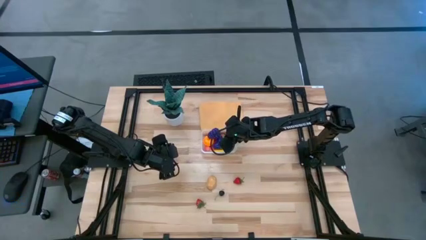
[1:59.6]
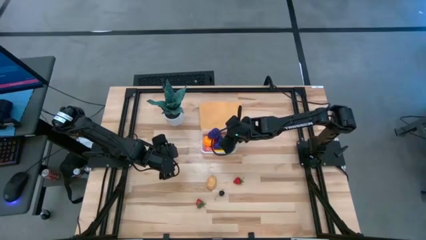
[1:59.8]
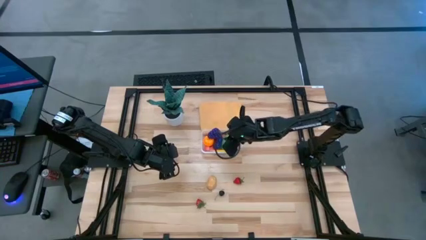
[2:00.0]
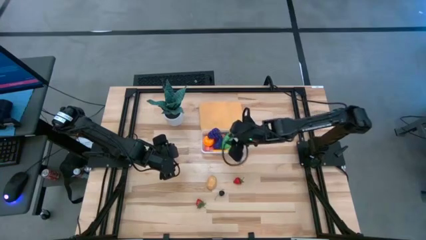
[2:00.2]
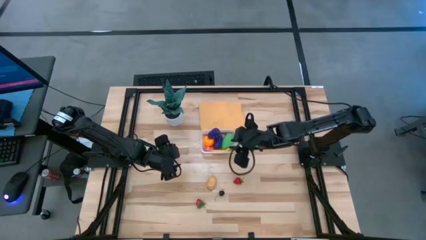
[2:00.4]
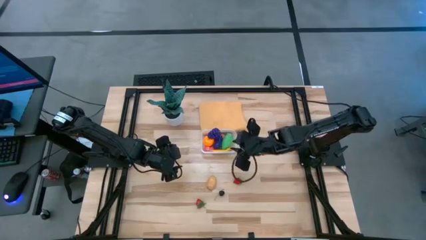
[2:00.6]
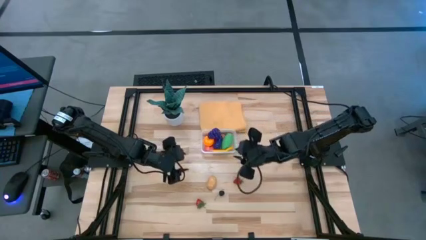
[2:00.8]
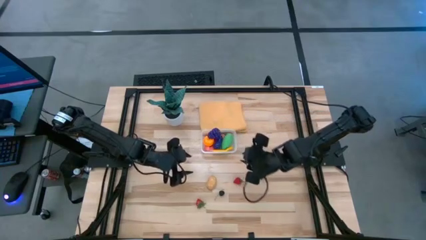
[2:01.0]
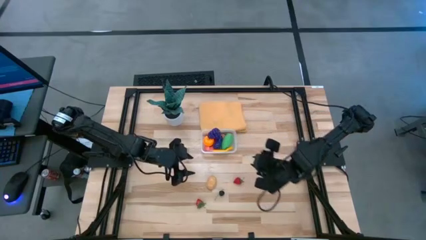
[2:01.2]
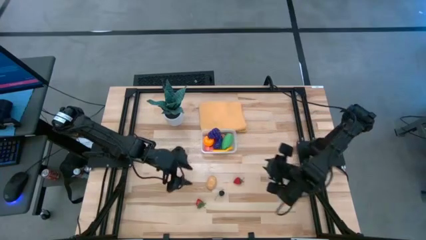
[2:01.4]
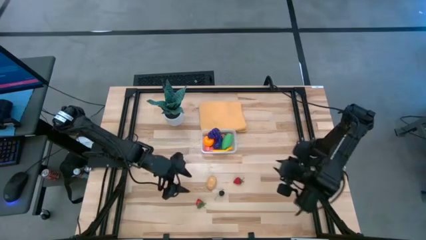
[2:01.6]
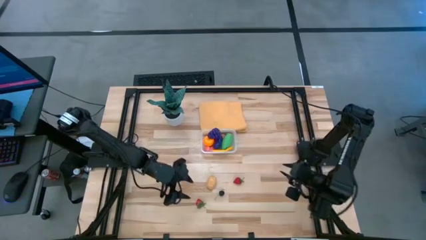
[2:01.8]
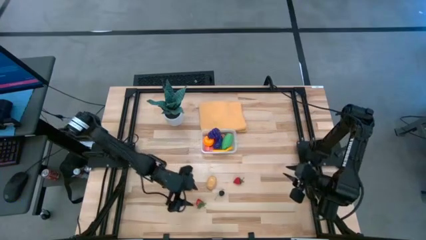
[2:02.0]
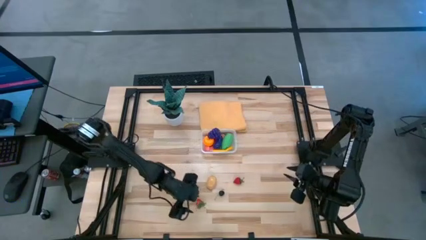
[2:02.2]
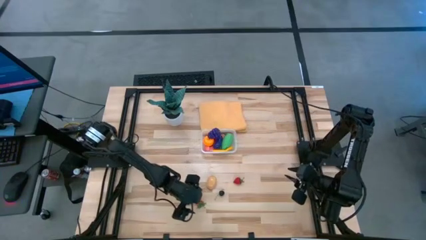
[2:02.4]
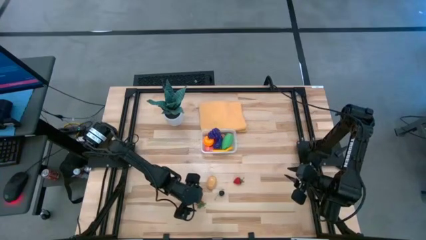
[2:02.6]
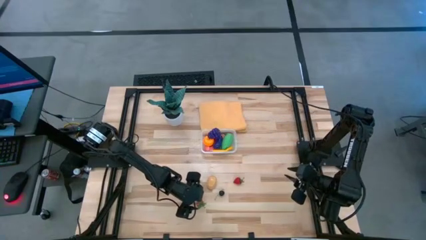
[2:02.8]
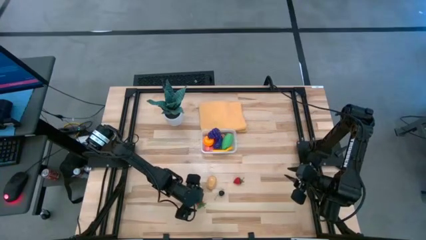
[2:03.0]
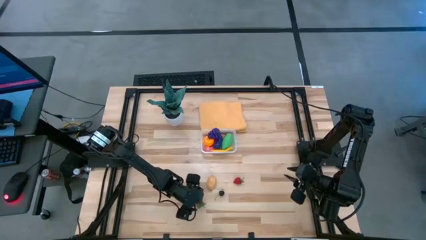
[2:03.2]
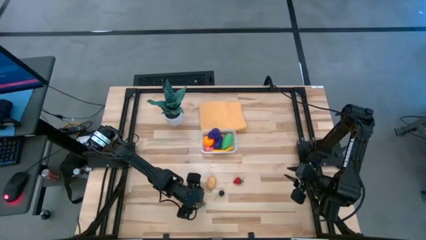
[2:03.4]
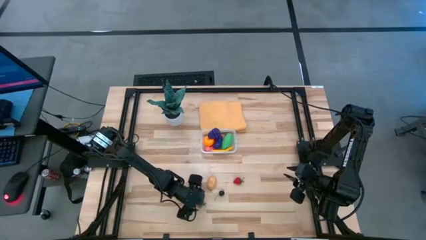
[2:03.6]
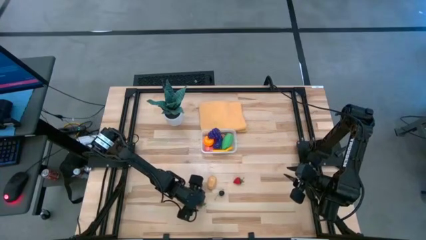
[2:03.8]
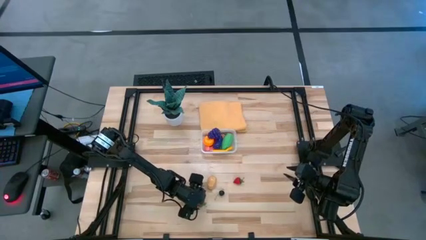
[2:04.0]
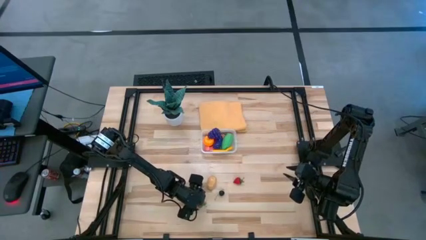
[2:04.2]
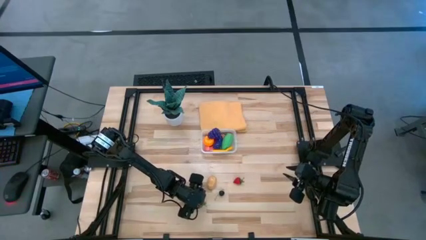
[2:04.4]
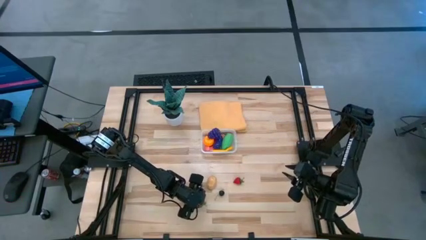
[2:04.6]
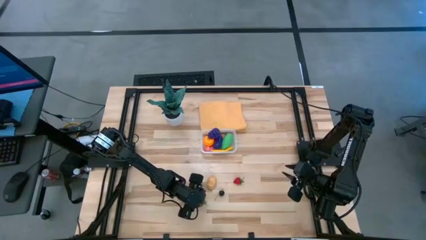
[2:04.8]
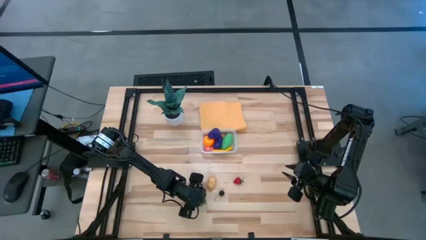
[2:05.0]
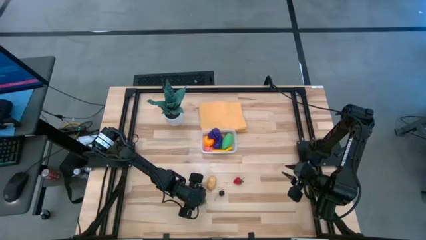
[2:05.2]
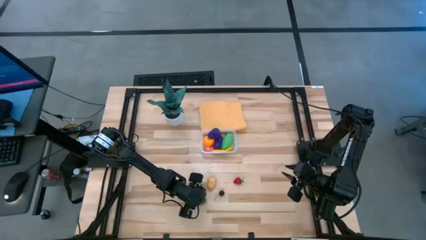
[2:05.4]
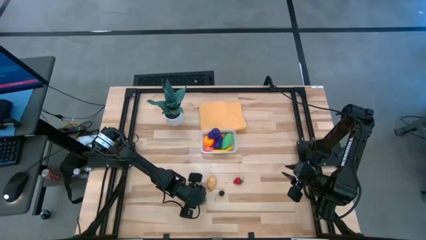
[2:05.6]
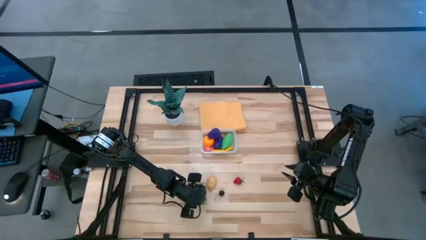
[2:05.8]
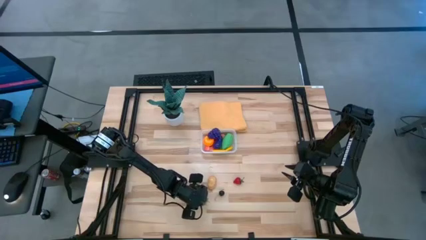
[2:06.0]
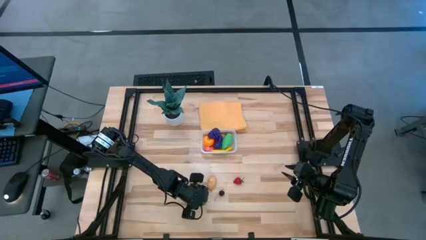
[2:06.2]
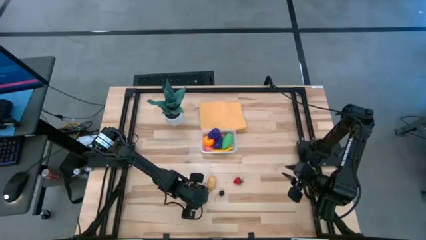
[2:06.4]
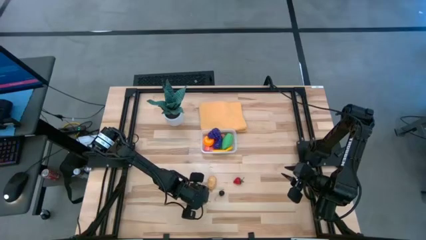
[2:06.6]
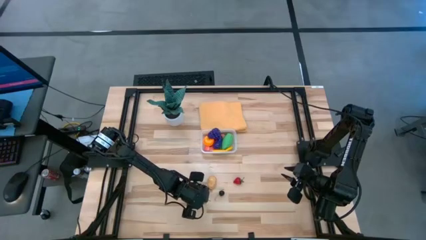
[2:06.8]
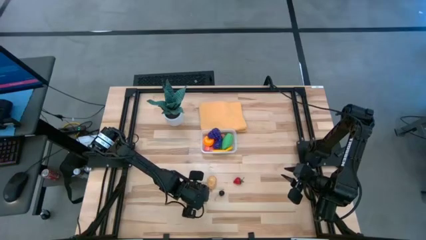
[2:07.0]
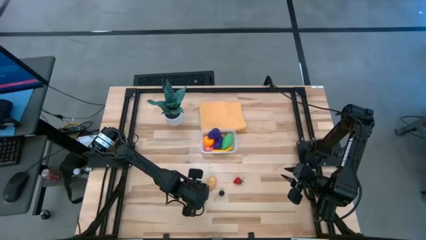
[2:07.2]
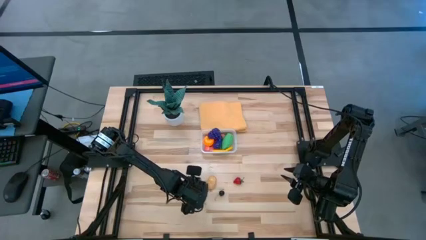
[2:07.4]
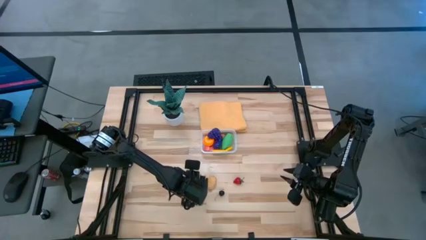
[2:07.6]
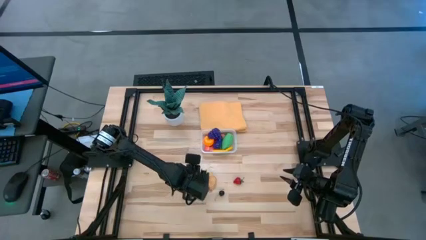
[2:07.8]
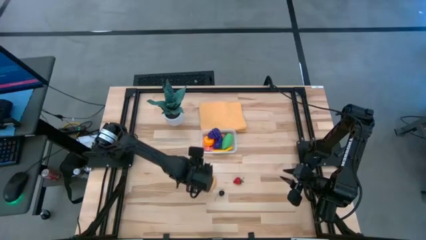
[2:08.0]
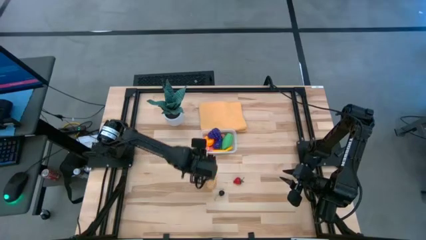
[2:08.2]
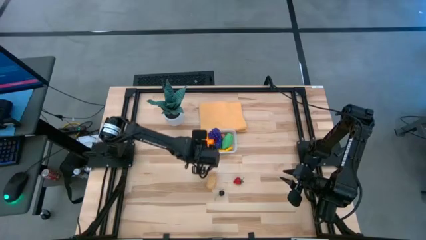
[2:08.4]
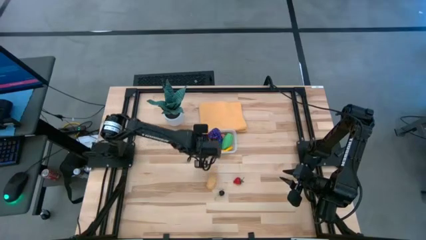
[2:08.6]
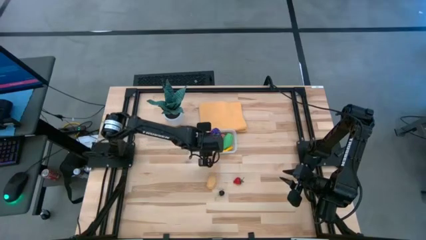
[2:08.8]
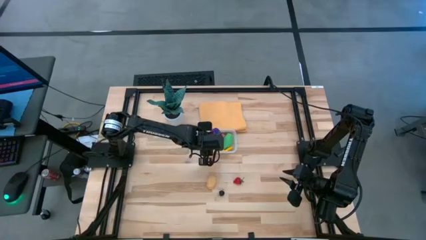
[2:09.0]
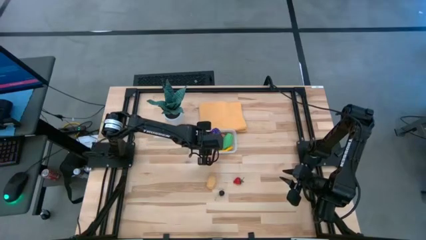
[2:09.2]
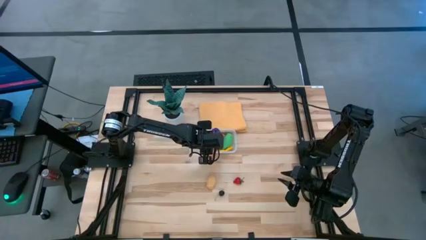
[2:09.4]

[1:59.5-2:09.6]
Task: Pick and placing Produce into tupperware
Put the left red strawberry into the transparent bin

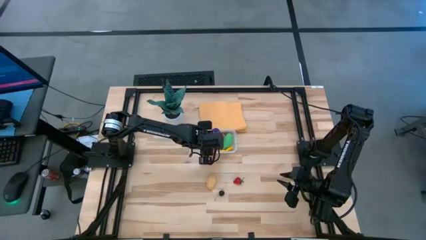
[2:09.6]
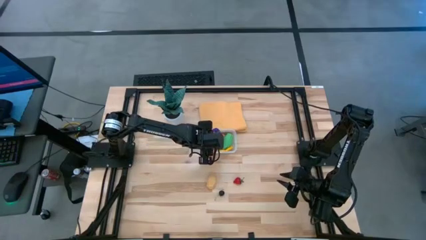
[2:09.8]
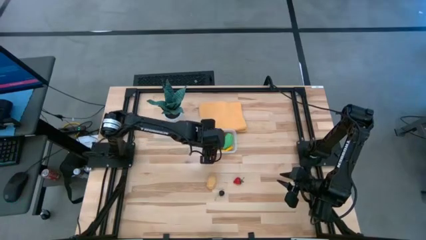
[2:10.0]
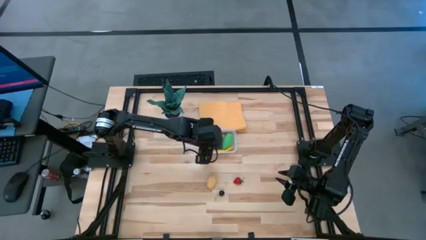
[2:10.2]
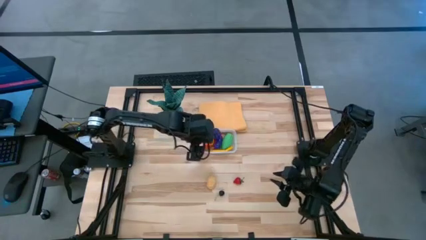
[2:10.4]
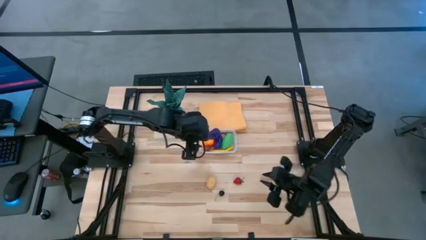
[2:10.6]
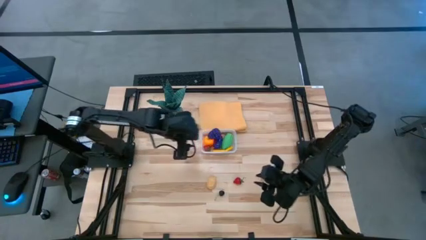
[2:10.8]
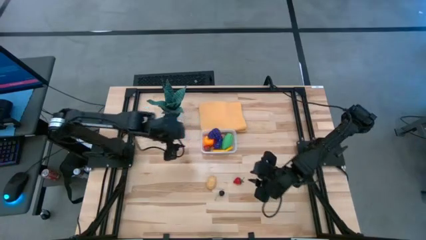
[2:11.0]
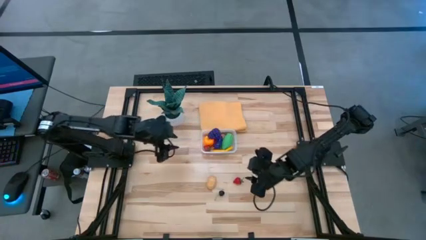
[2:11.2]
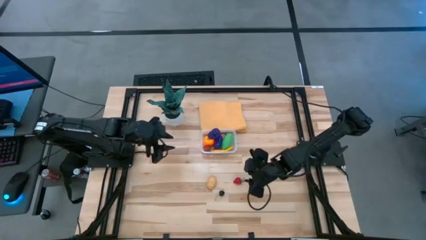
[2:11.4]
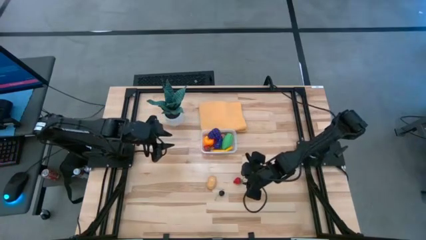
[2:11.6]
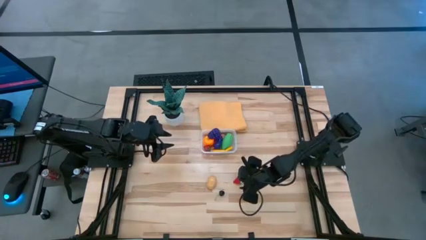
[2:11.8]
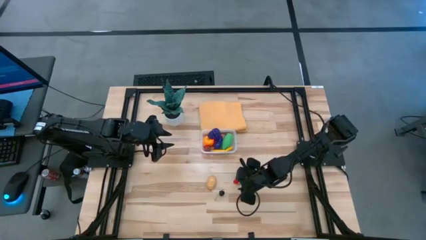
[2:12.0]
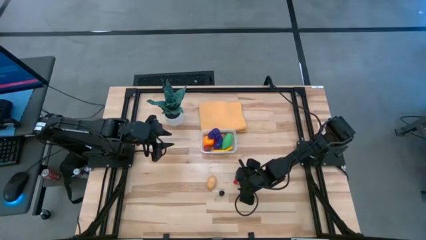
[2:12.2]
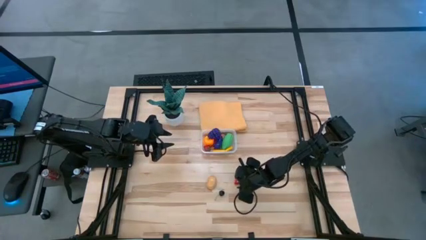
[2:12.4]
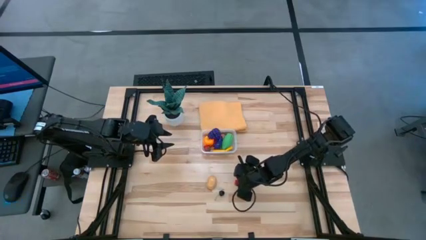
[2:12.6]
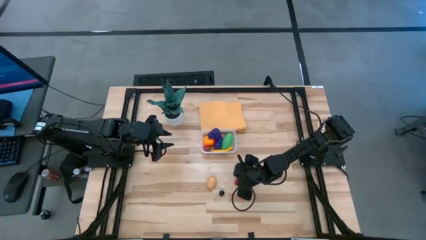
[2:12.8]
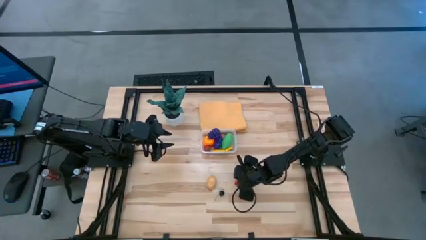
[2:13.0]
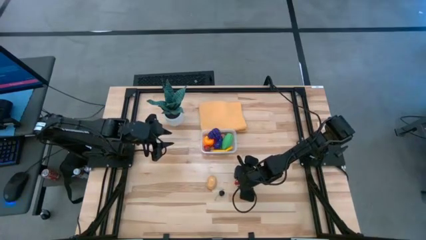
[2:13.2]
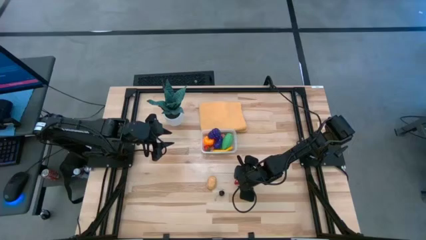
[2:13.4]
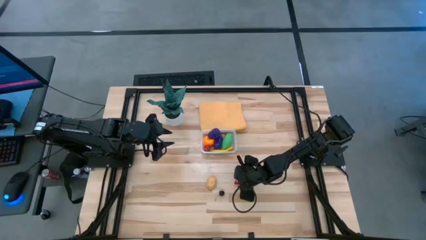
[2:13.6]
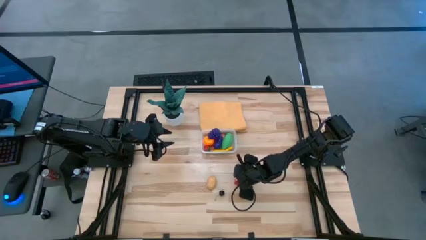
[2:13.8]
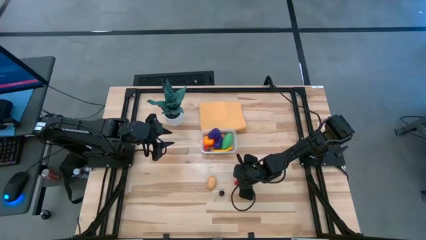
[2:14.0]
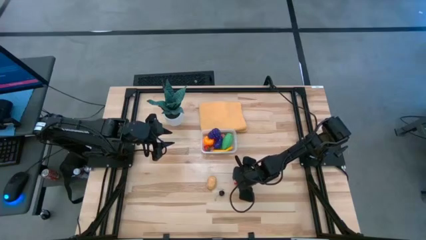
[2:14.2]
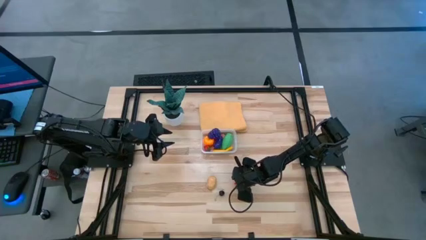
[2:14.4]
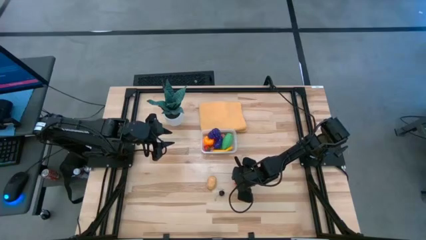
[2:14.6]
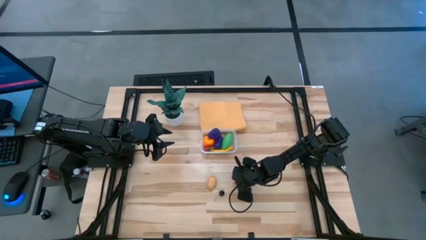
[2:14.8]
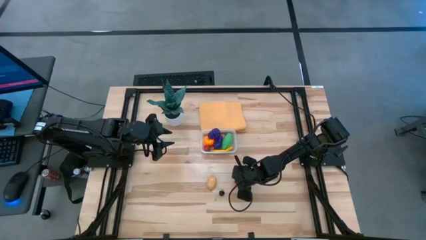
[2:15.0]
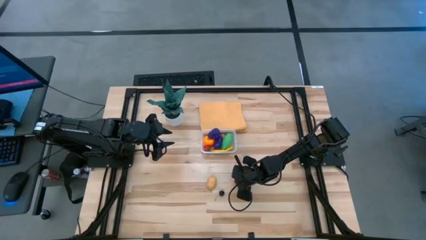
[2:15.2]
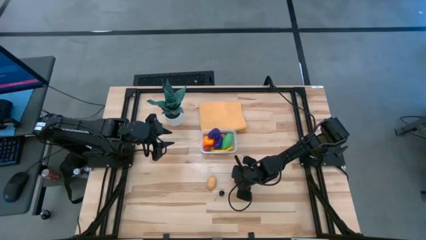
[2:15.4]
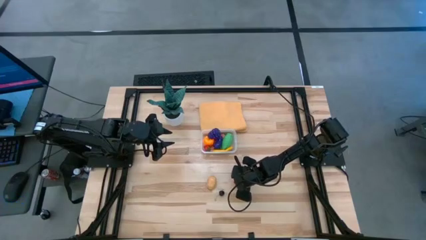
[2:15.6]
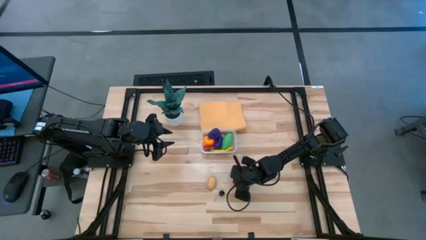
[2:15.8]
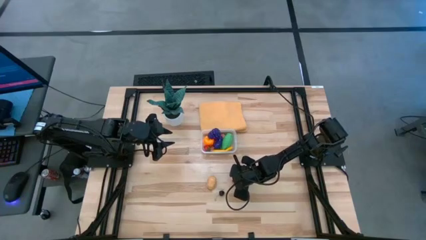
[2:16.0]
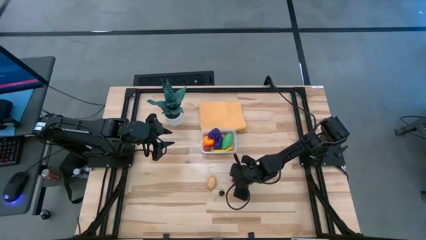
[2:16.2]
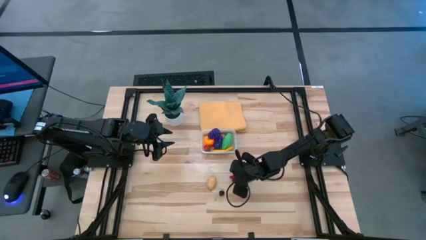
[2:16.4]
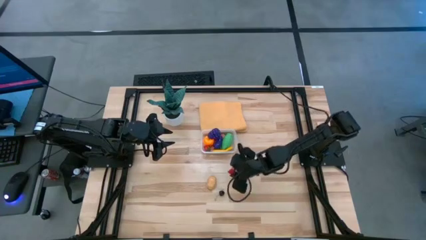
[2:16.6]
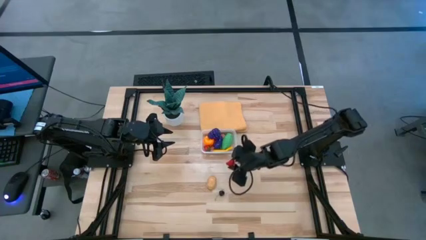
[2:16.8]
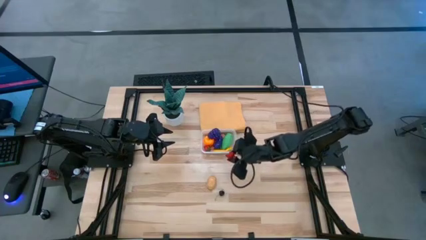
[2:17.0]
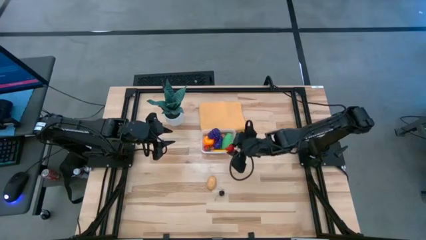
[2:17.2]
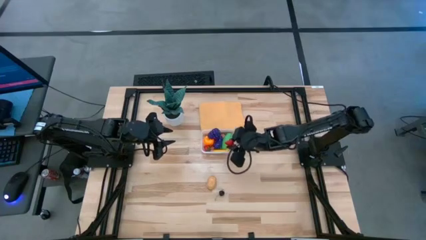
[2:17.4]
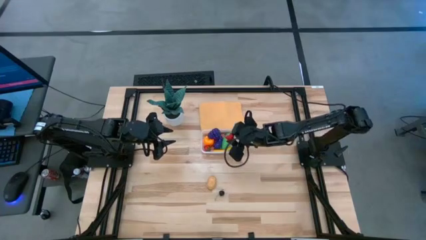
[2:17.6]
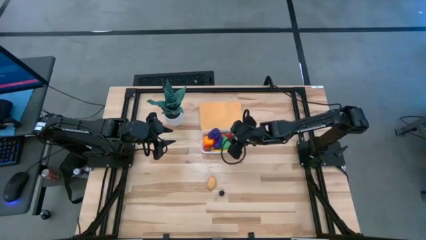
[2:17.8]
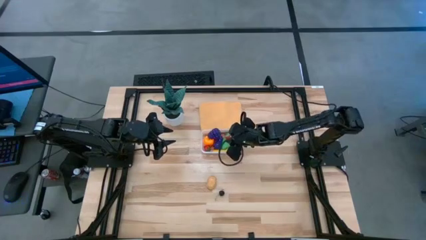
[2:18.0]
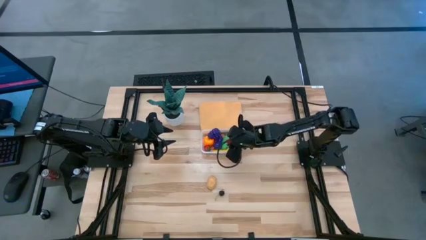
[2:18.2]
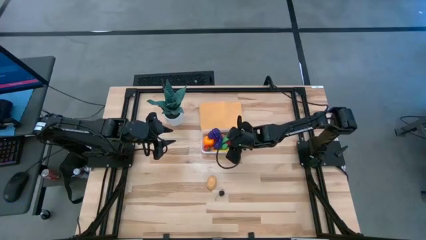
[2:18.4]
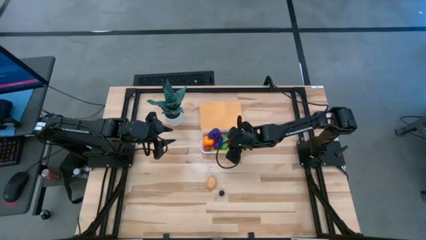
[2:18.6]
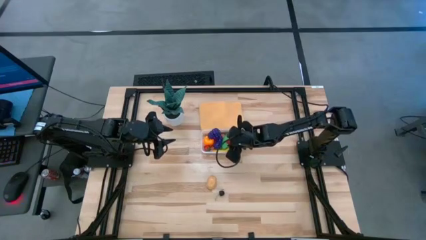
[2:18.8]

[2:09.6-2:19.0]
Put the red strawberry into the transparent bin
